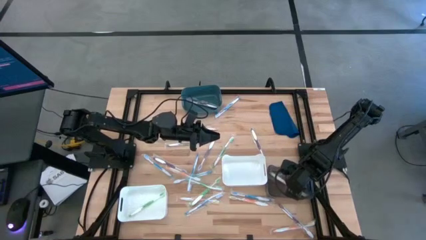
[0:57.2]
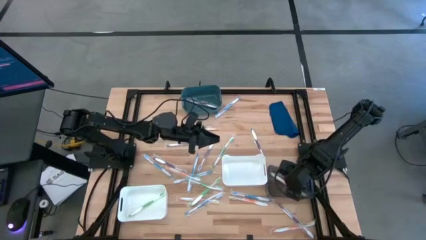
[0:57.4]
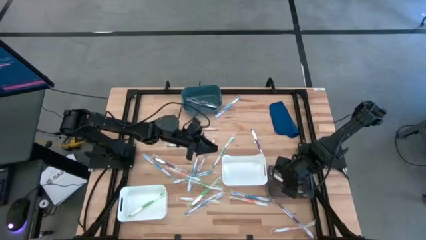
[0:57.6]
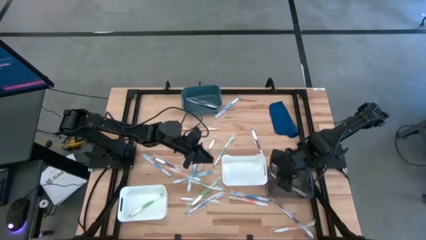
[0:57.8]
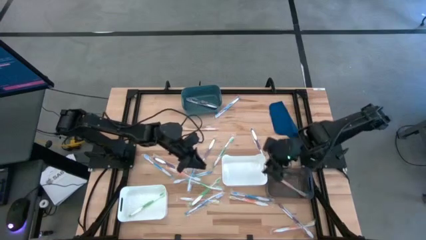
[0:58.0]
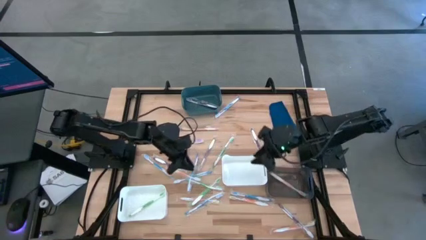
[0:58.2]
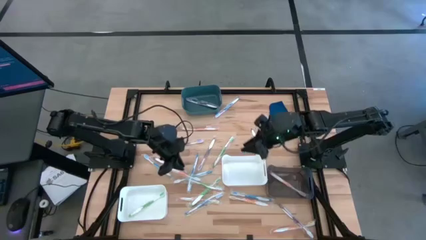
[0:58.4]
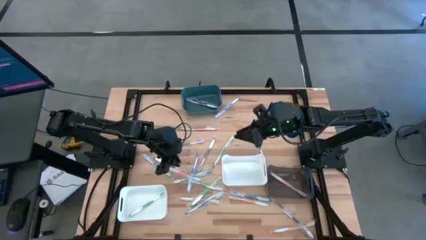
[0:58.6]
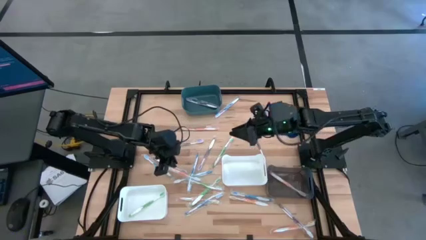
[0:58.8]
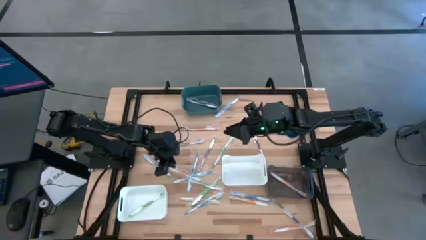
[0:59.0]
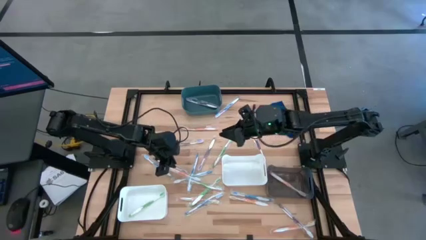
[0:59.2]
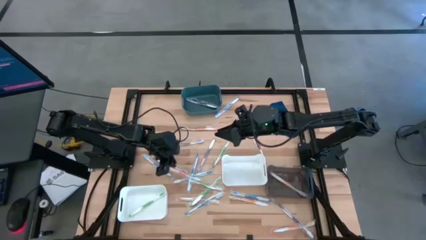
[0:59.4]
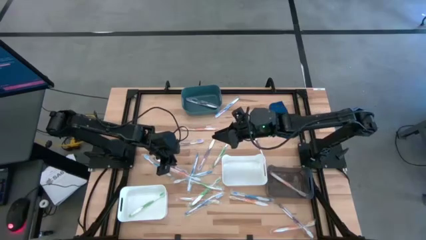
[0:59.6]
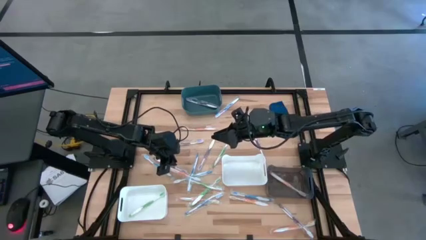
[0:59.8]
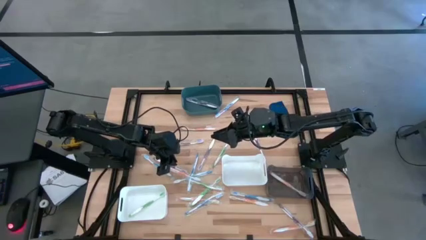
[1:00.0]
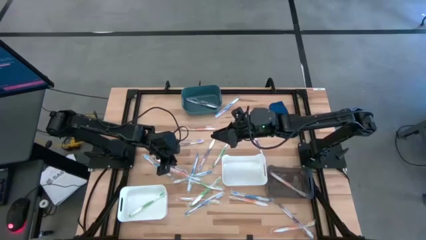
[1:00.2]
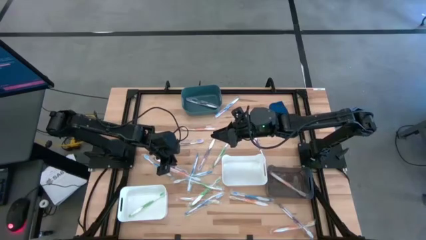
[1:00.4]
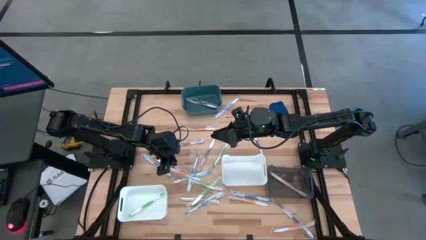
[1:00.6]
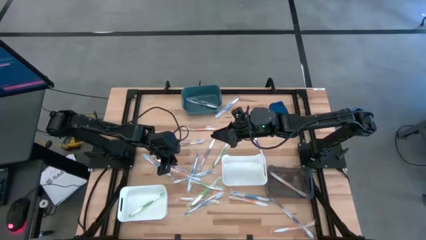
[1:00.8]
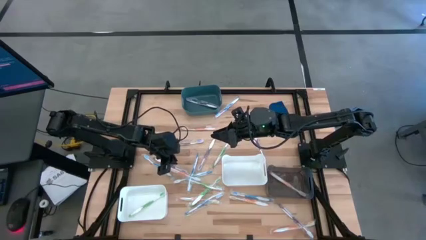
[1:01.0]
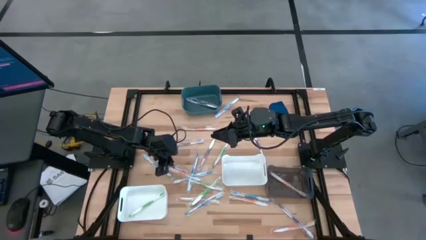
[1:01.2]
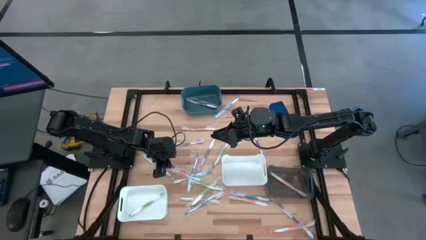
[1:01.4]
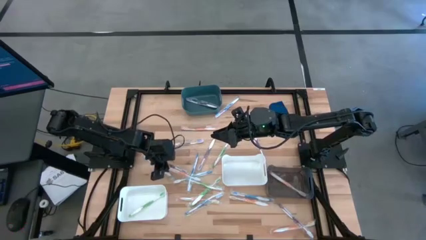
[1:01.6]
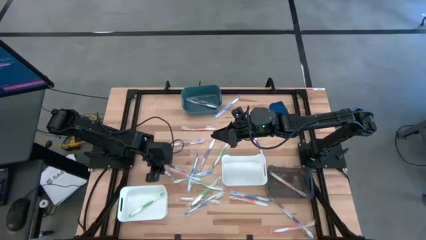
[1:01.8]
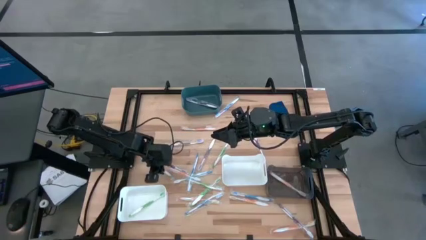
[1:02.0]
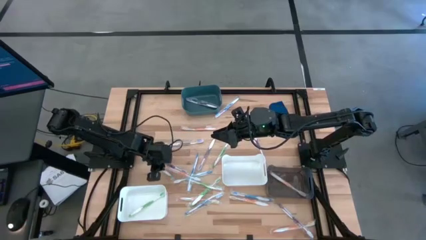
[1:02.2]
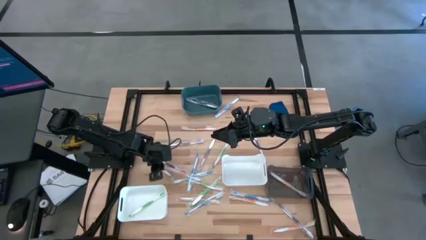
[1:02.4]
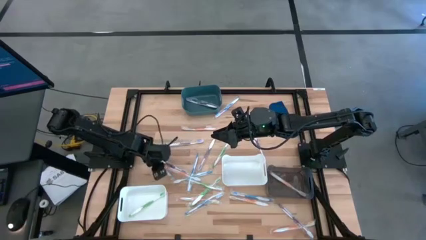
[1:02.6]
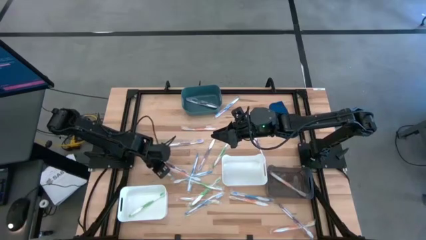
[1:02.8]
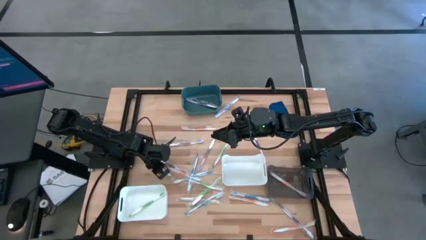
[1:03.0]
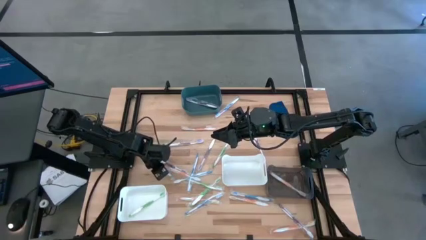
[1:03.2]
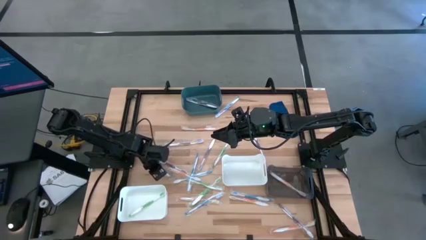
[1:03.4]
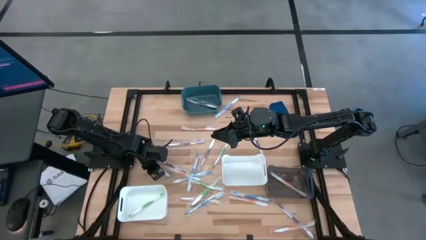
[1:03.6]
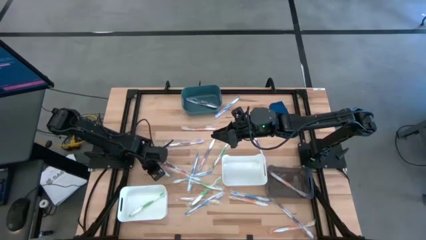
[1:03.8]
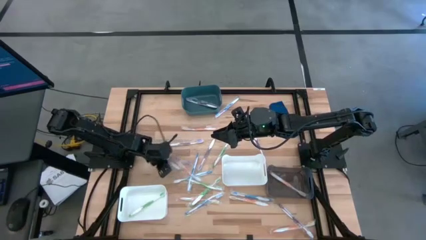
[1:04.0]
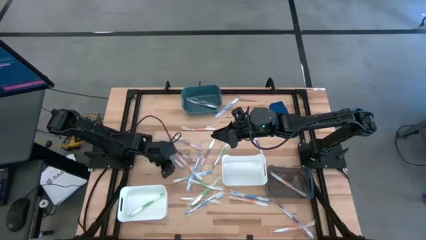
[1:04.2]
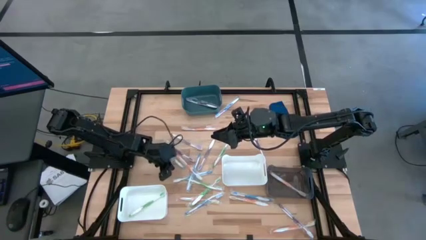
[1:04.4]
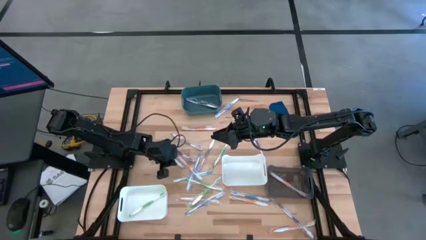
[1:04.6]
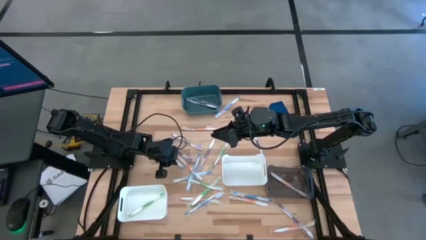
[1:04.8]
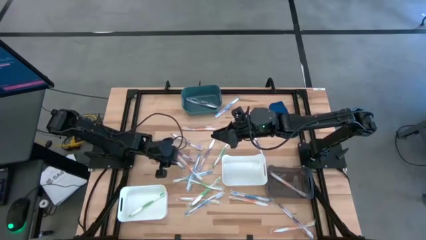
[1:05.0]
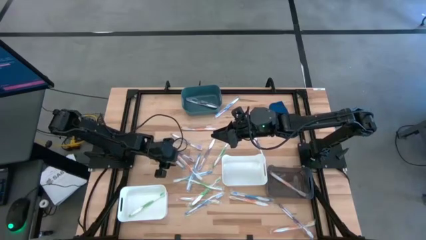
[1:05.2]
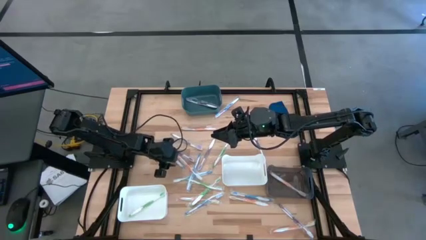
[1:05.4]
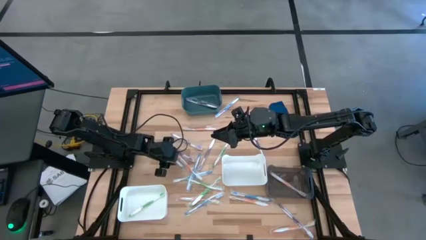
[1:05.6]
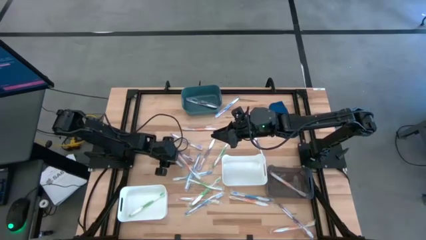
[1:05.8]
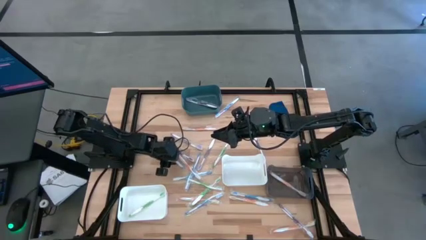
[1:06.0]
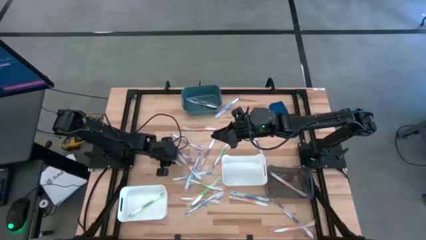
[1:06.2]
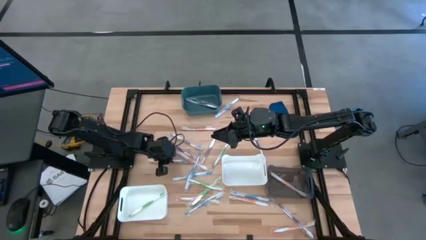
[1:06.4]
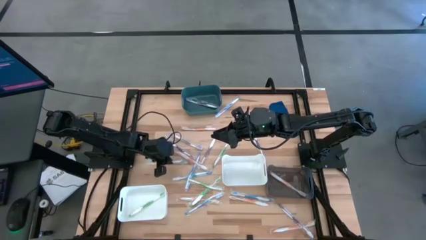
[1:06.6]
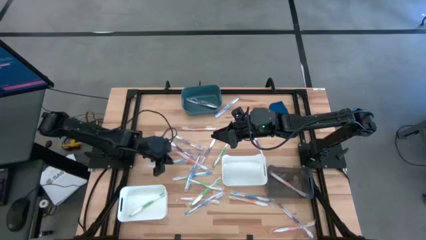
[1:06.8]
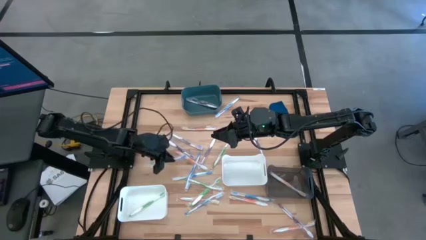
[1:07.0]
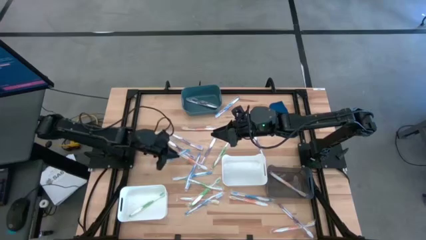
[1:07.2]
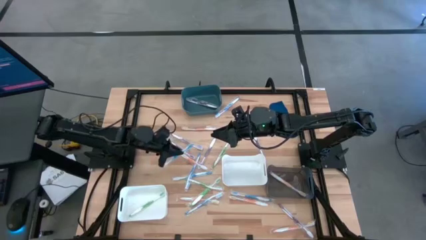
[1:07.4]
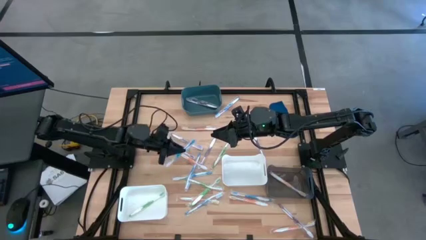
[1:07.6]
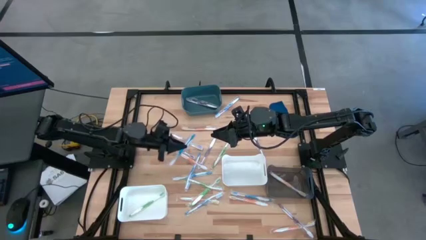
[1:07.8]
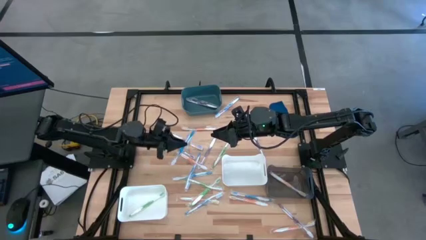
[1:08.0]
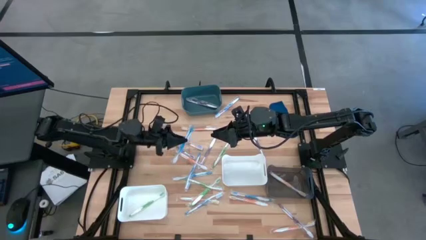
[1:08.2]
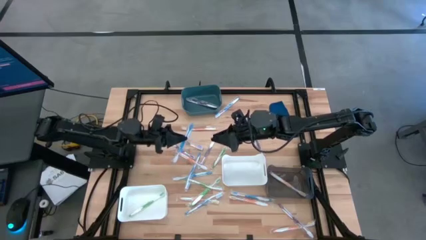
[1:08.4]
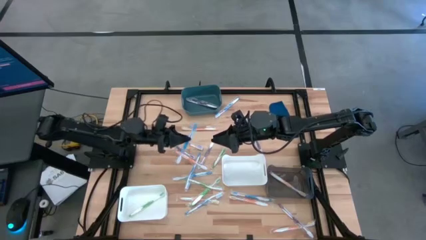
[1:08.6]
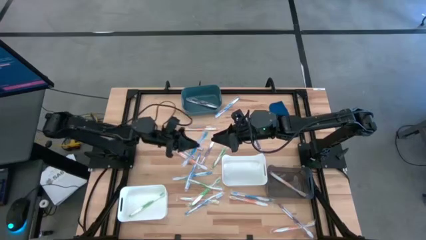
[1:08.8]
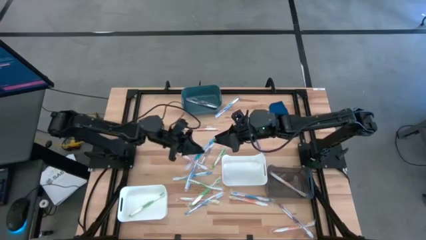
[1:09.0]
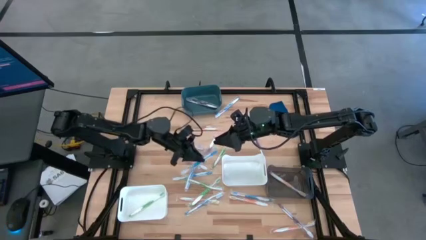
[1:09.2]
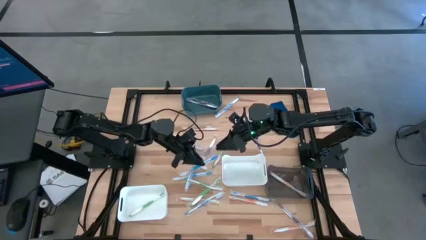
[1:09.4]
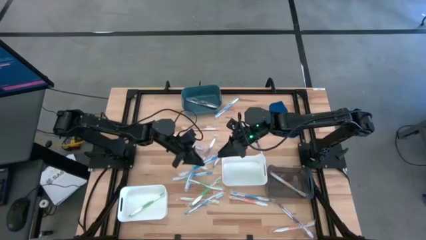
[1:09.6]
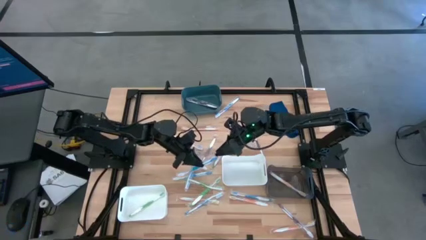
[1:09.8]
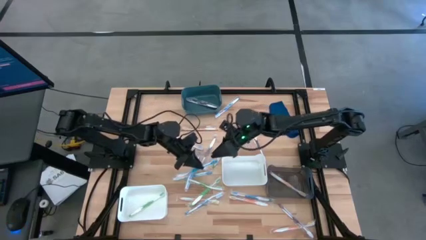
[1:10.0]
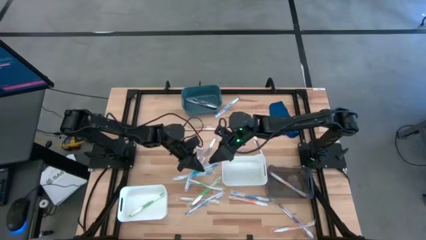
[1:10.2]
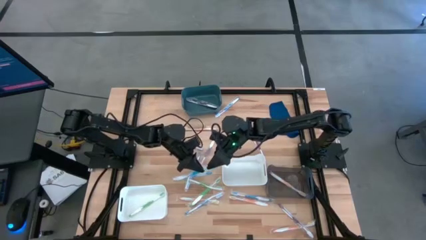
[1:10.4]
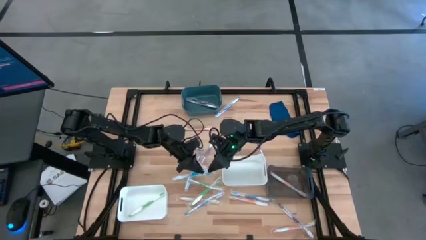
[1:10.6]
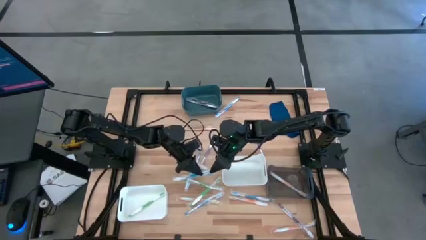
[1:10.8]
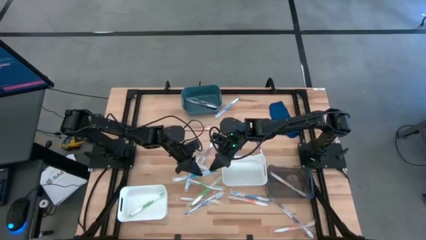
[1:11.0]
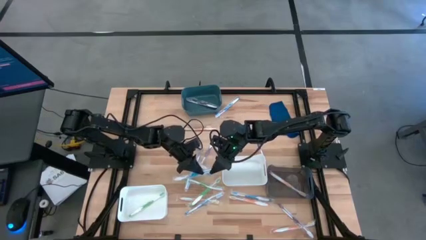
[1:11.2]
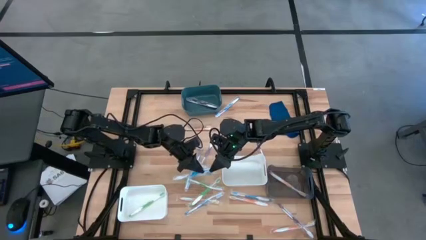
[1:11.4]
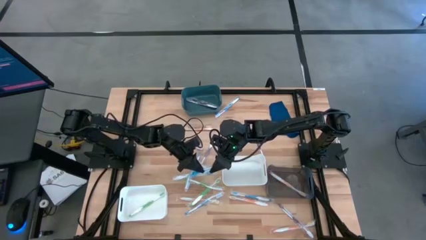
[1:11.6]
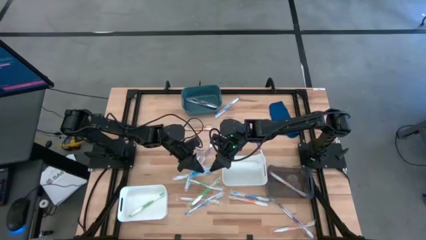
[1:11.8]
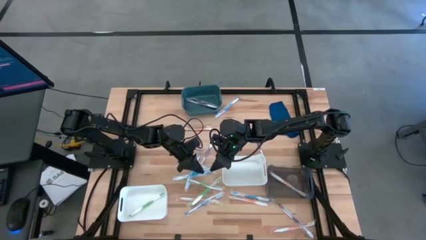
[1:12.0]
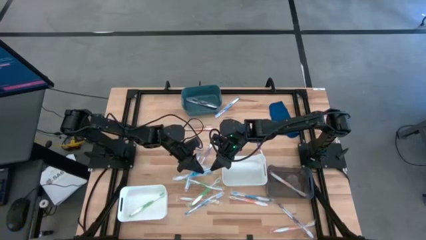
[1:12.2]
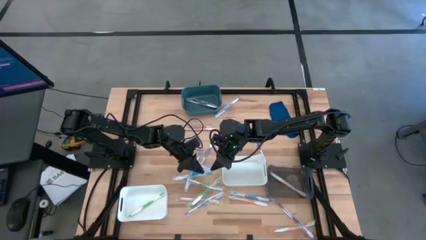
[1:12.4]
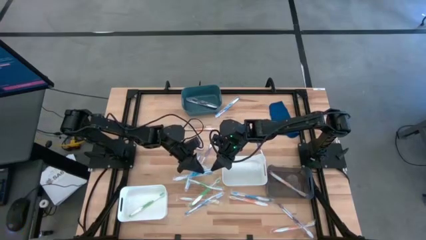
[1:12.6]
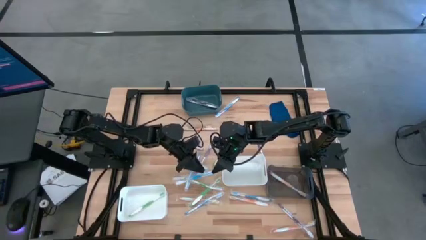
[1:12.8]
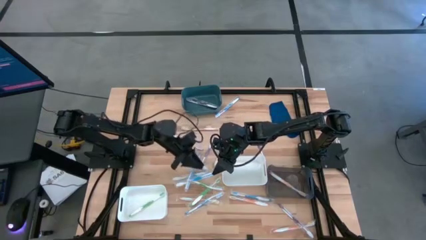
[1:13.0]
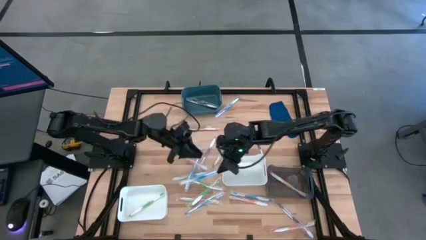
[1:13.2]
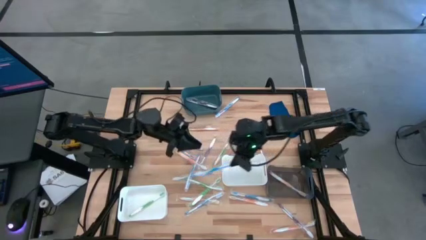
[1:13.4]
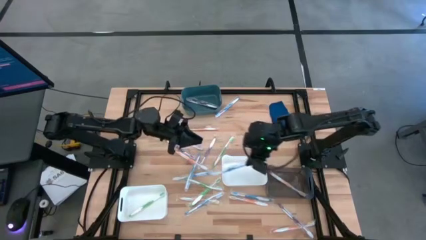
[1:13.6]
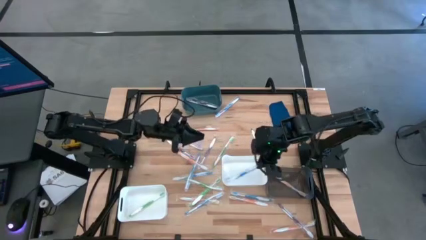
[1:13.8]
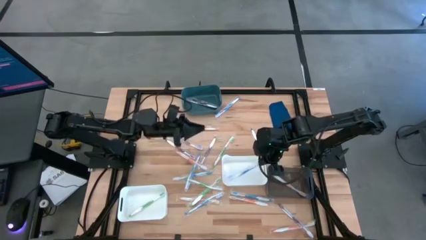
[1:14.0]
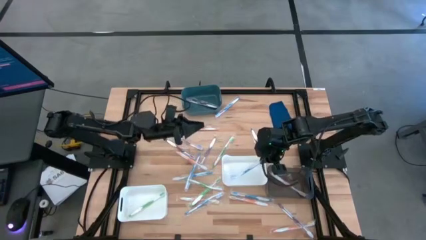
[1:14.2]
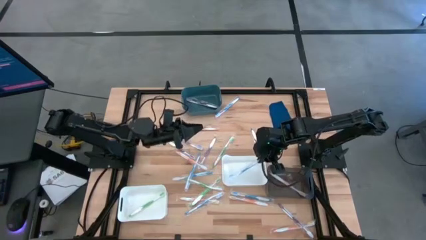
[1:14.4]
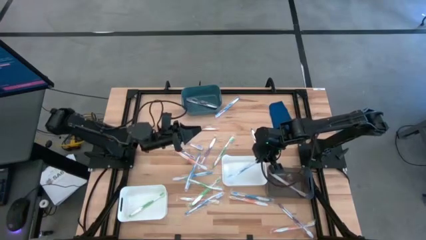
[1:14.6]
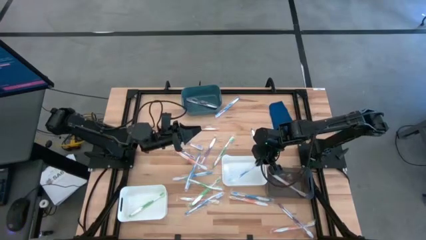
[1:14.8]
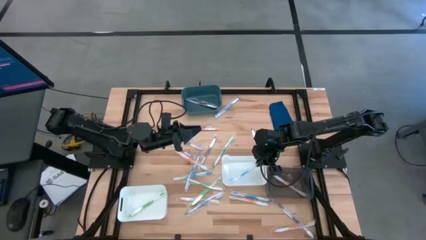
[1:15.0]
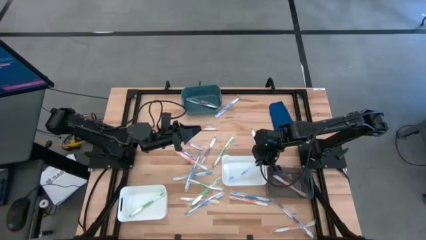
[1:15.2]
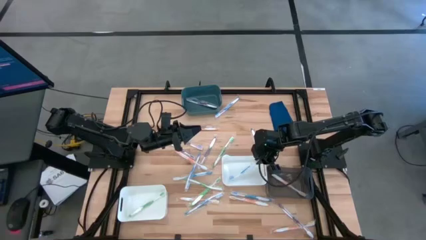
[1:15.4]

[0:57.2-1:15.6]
Task: Pick & Place Toothbrushes
Put the blue toothbrush into the top white bin
